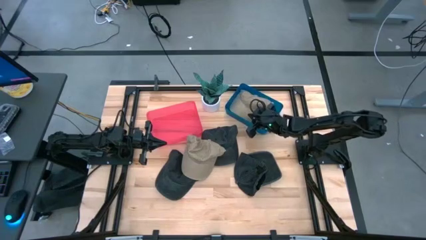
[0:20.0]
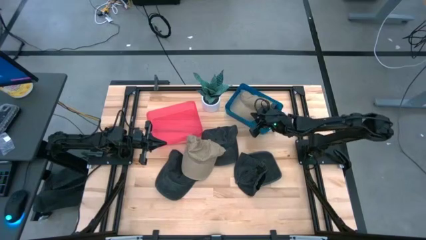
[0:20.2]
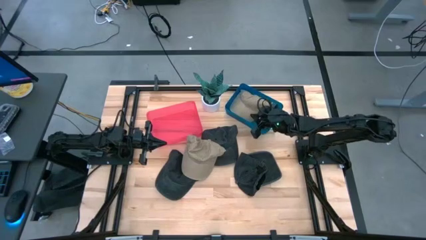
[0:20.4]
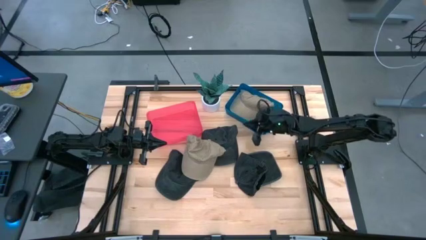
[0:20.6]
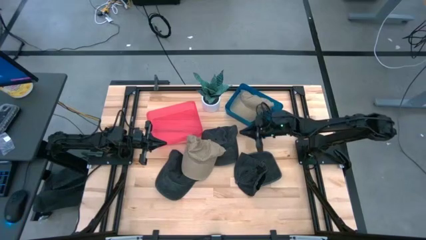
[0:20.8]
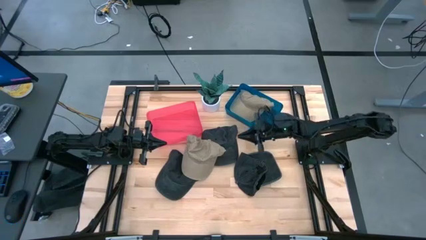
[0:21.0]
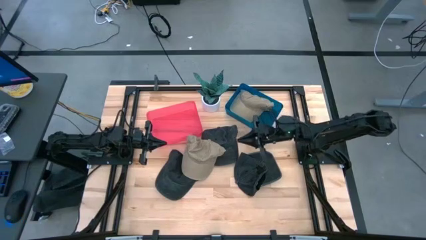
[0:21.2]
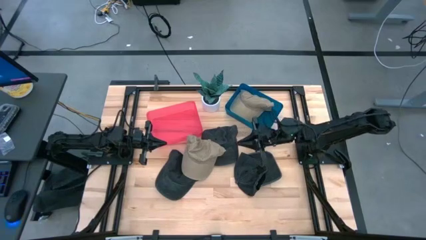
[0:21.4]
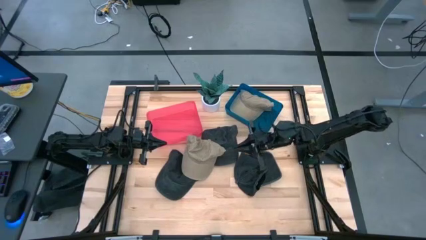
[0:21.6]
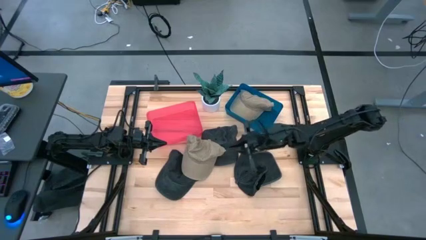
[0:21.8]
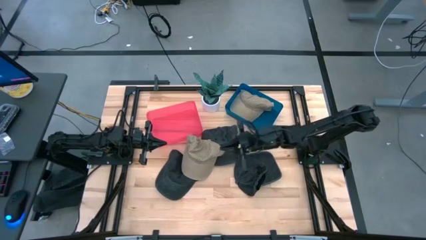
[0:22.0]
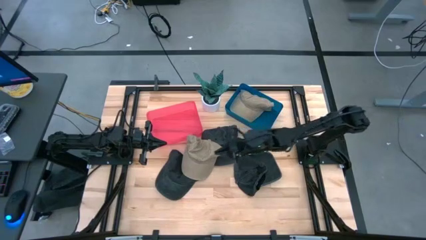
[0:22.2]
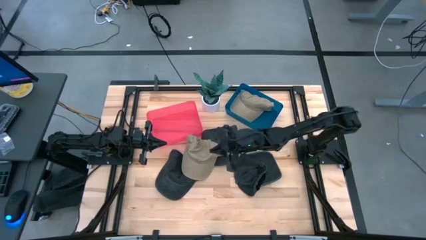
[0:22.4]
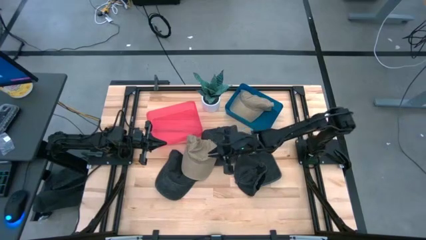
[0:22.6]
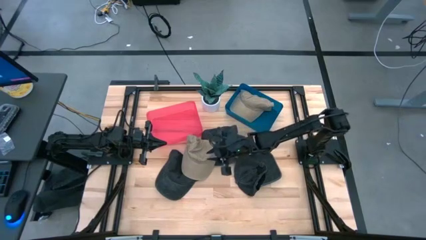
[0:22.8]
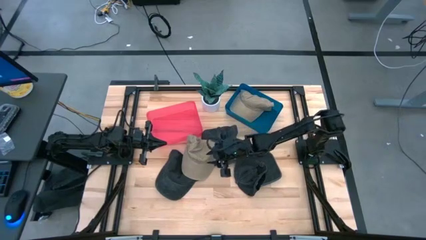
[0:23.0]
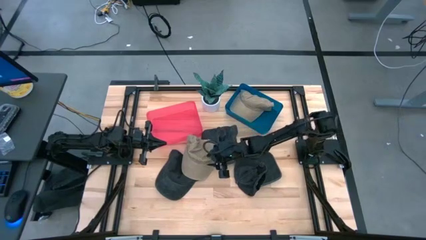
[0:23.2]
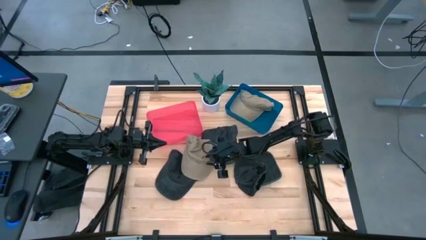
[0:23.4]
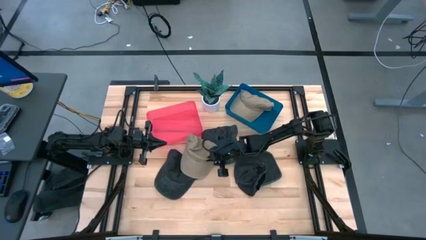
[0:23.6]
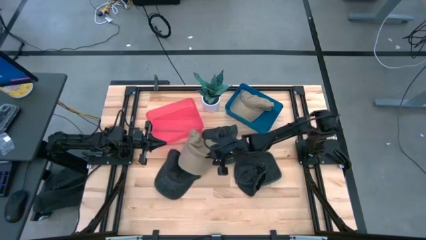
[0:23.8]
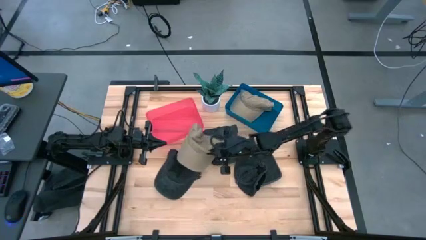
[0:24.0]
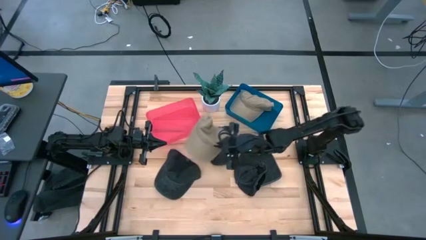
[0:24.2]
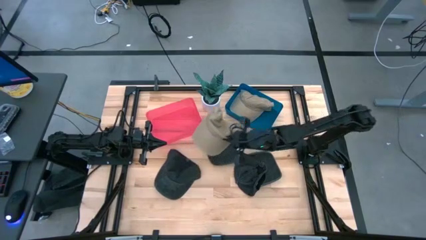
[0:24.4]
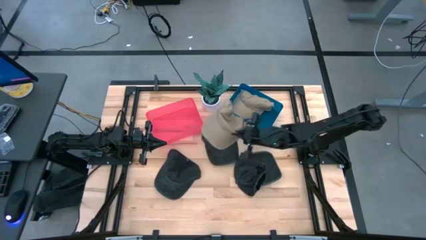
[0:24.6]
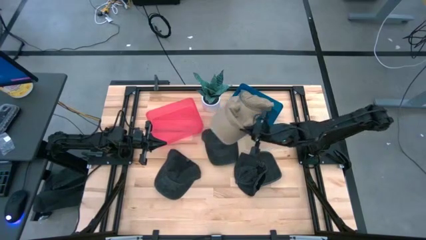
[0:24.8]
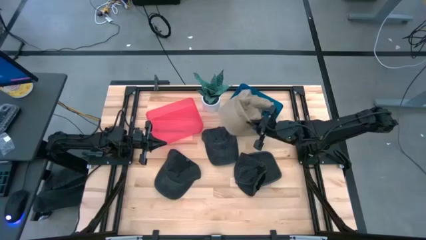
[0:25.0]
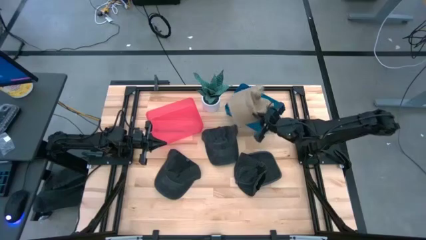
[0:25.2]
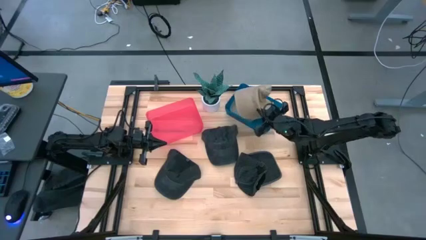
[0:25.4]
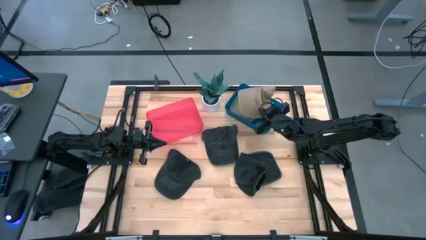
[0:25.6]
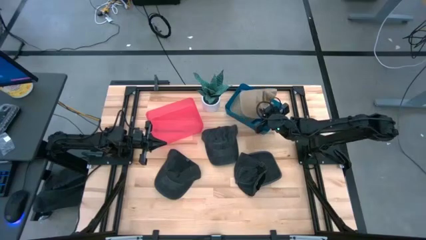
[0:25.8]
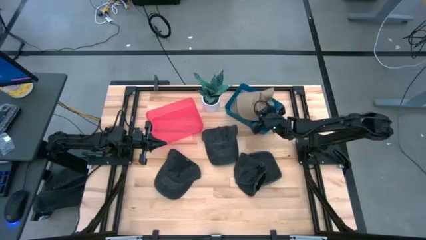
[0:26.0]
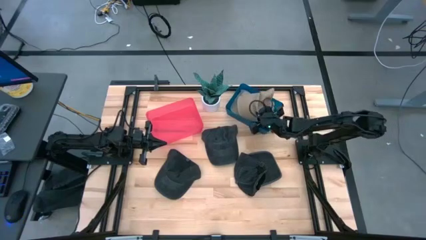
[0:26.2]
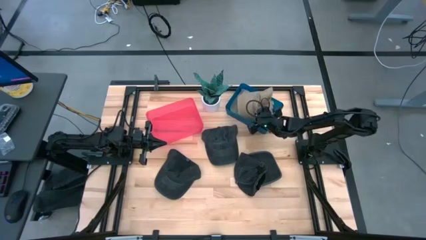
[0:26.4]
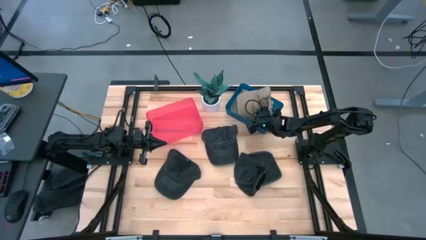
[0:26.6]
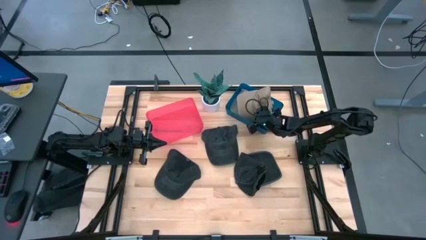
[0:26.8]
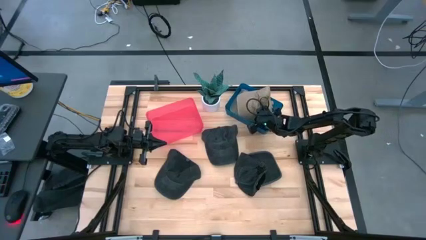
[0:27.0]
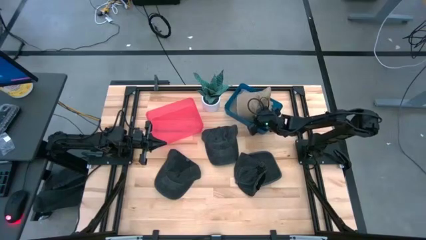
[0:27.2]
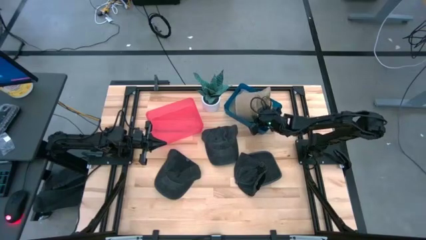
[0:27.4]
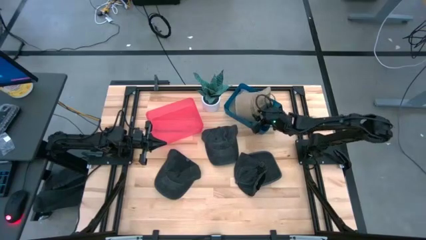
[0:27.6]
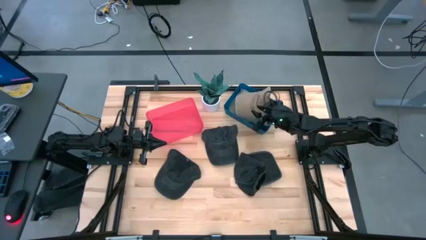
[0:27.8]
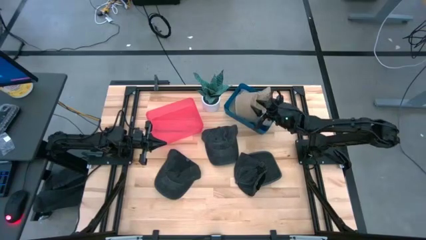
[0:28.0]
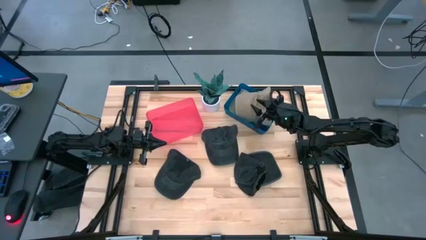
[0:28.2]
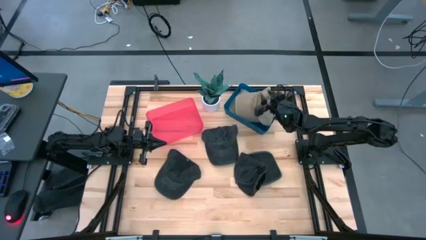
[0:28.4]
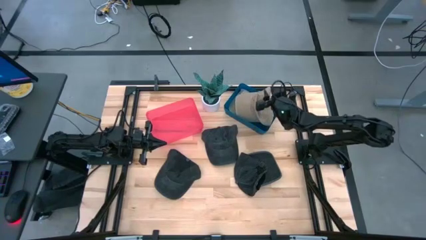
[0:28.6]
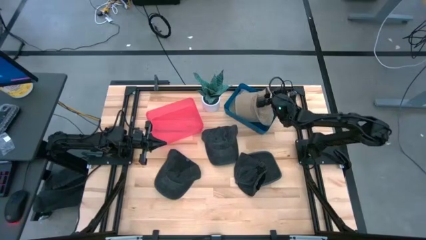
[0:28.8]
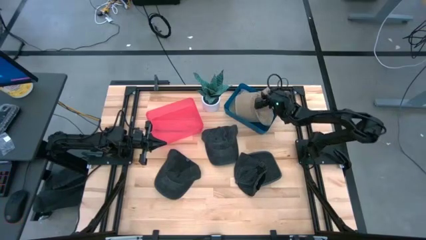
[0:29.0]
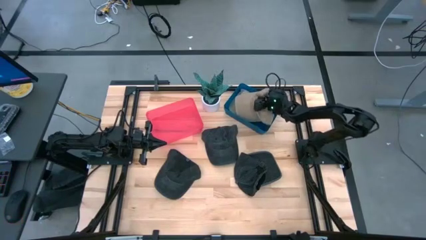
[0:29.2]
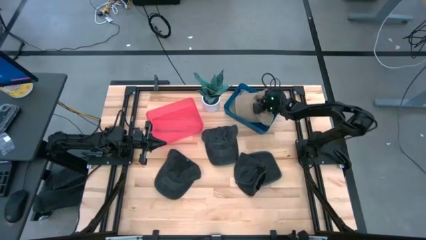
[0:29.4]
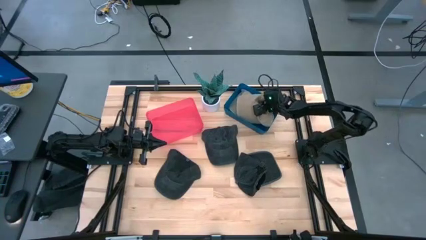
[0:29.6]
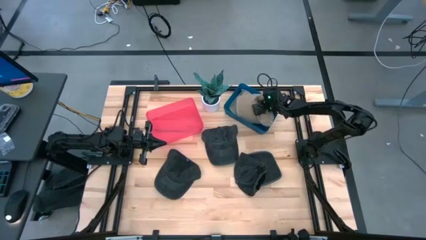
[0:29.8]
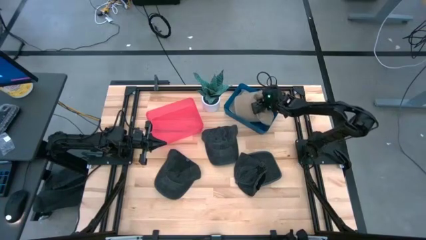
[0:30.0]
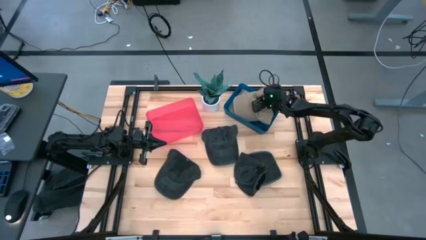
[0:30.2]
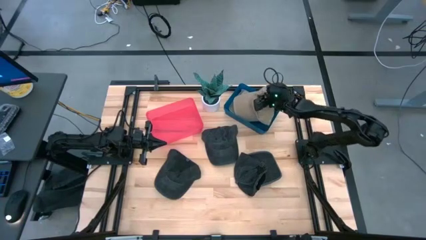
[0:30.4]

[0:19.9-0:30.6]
Task: Pick & Place hat
Put the brown cap into the blue bin

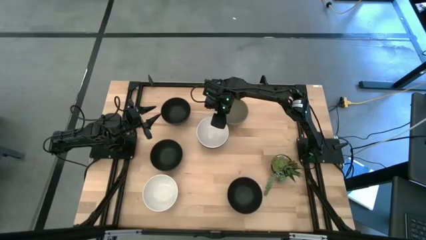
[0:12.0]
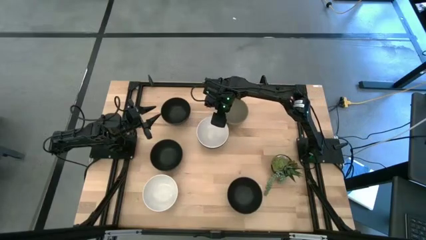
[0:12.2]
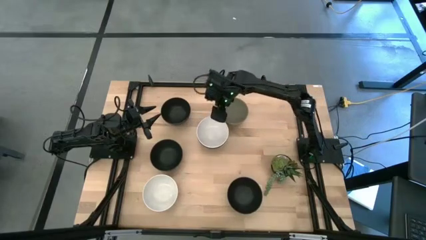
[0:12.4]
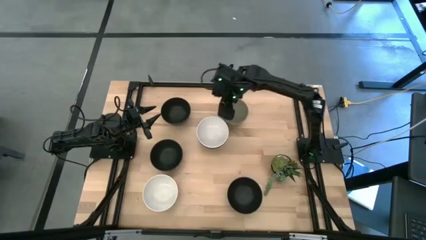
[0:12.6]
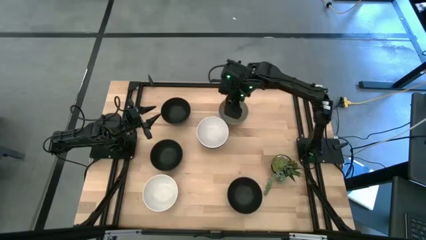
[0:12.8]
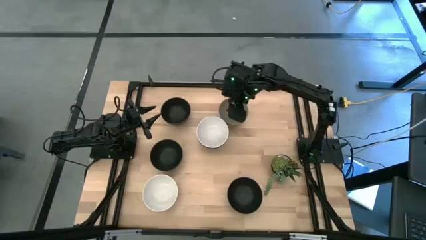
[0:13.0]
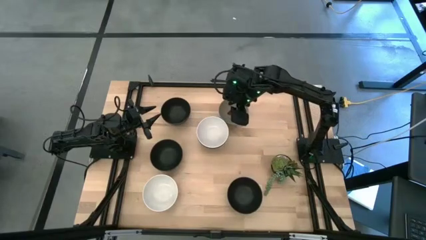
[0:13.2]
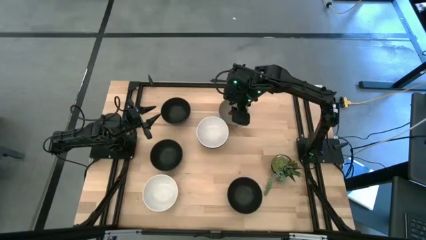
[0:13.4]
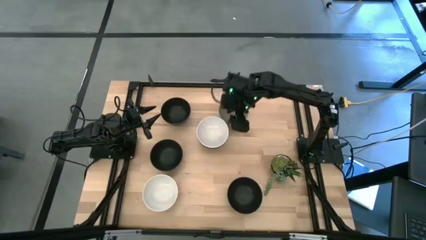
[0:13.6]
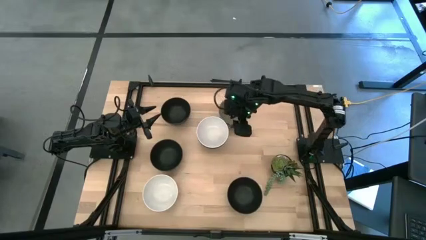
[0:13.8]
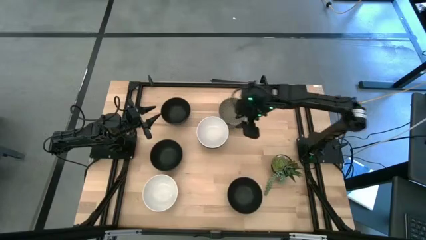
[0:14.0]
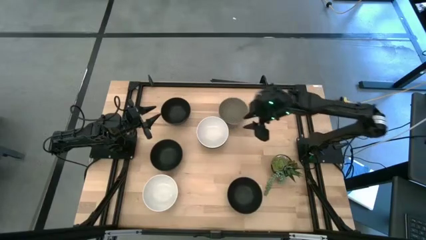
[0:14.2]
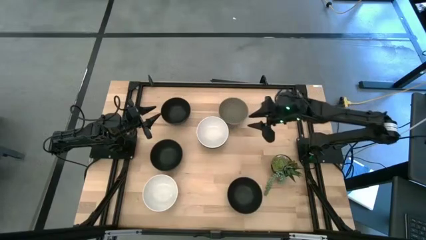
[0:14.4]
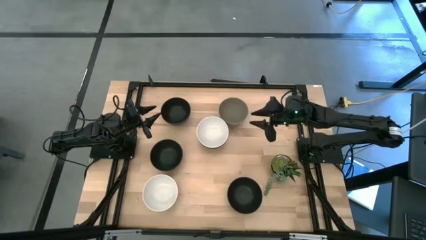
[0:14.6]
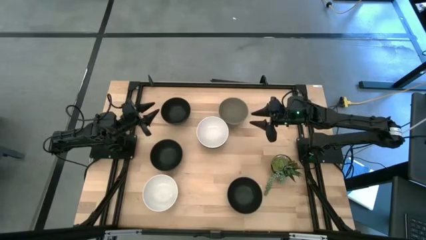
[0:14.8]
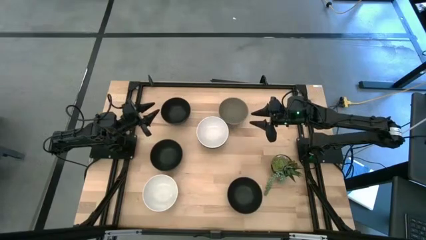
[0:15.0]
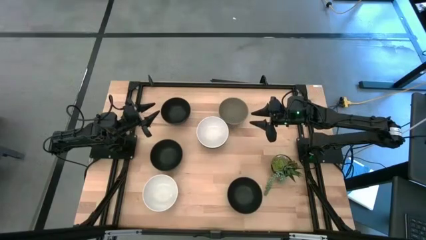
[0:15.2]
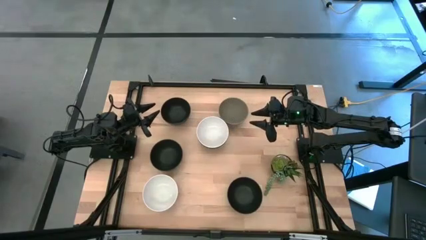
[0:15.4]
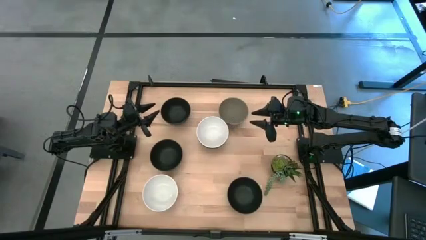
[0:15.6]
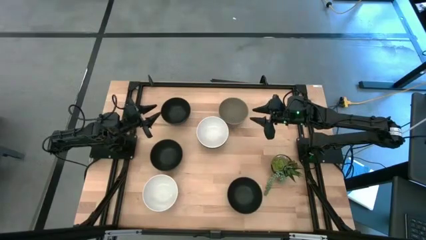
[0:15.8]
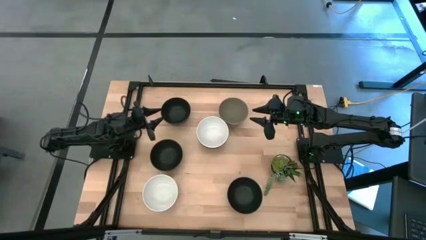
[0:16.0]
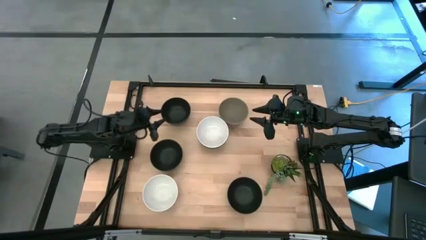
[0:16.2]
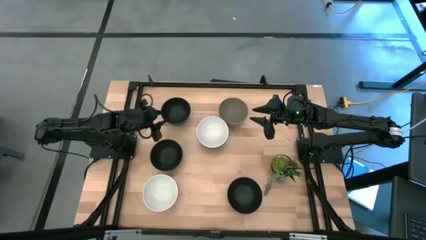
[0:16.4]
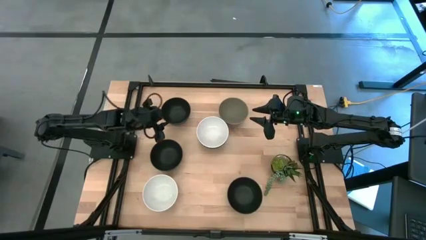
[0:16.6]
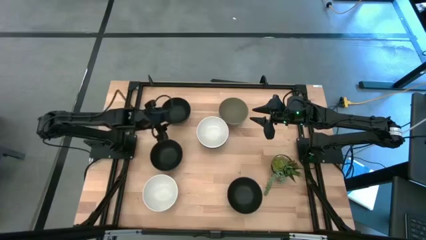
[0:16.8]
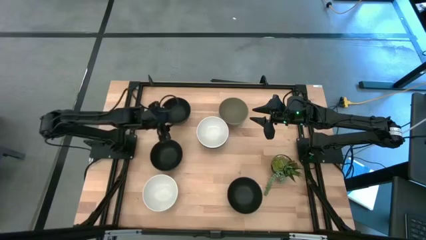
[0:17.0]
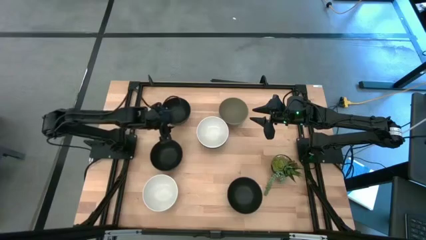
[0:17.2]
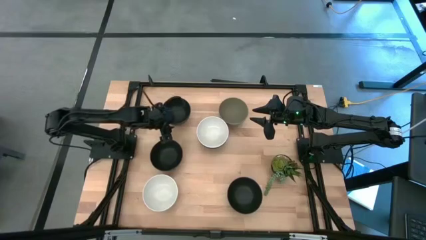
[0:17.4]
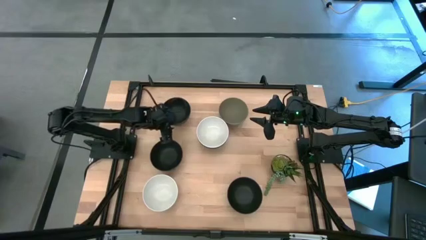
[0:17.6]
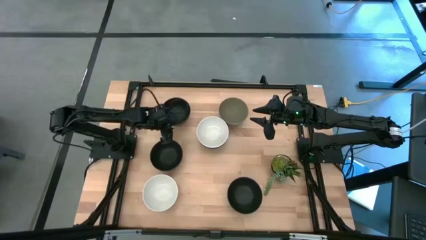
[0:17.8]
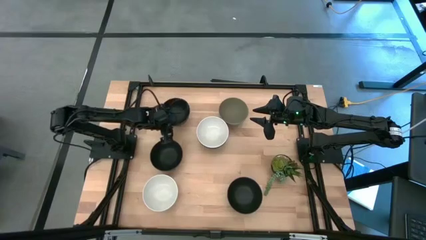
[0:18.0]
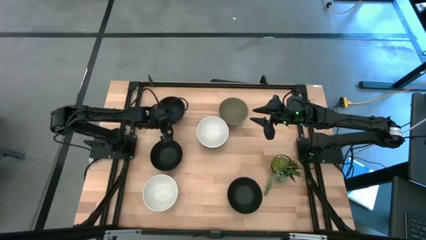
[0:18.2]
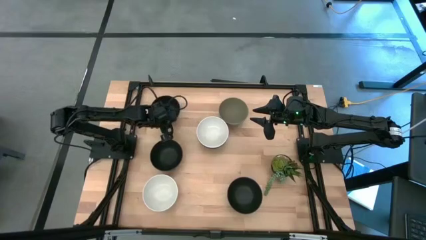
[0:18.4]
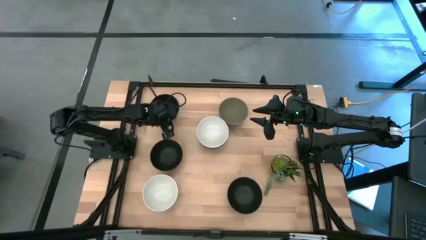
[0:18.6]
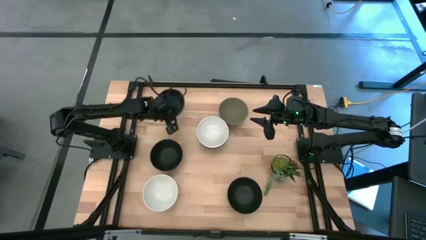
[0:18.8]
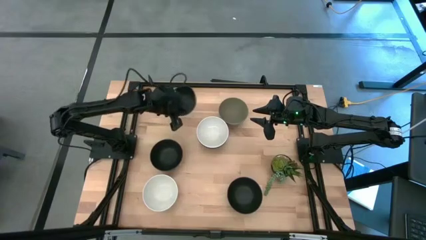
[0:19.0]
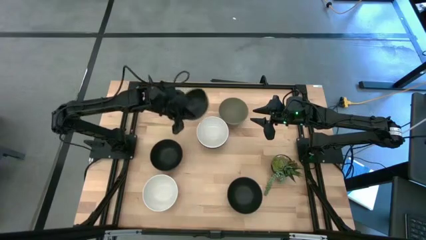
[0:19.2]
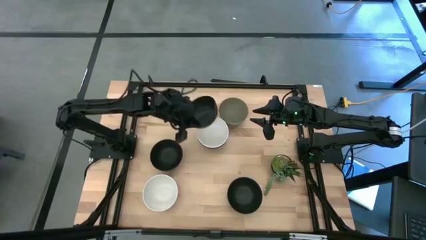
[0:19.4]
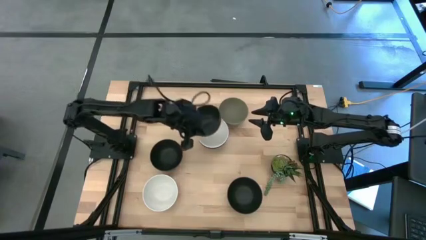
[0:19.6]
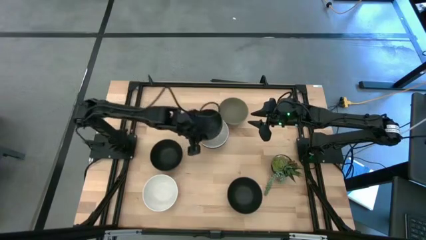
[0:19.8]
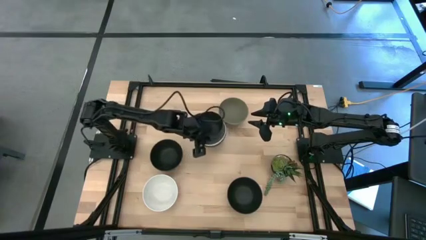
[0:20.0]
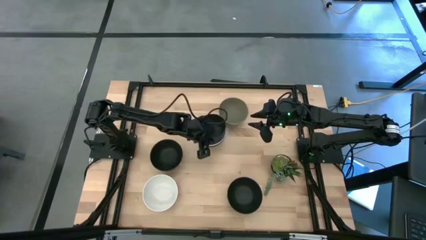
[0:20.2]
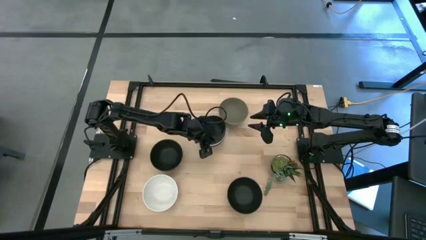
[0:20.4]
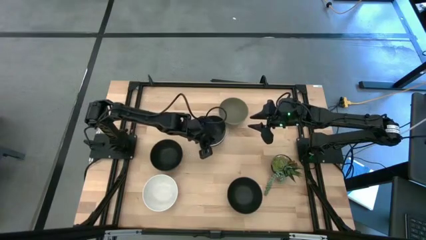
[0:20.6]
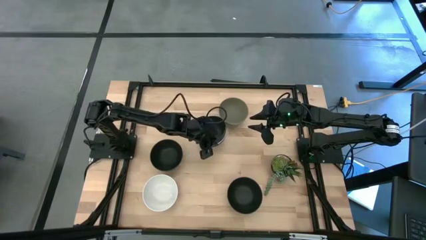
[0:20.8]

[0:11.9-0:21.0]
Task: Nest bowls inside each other
Stack the black bowl on the white bowl
